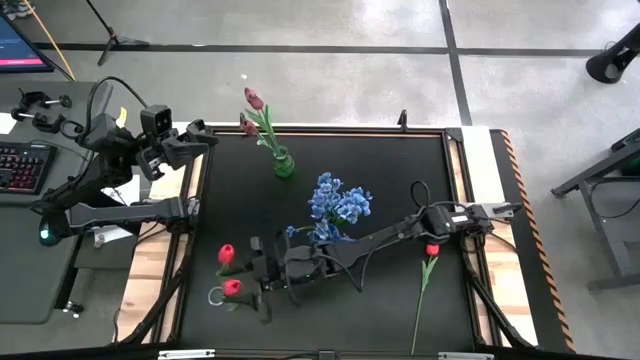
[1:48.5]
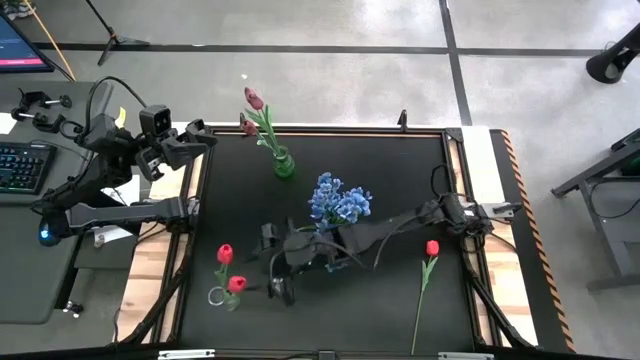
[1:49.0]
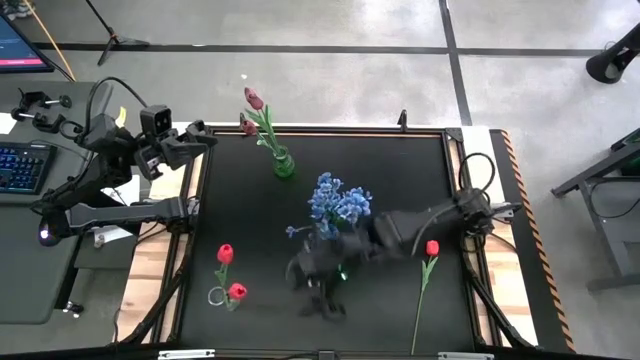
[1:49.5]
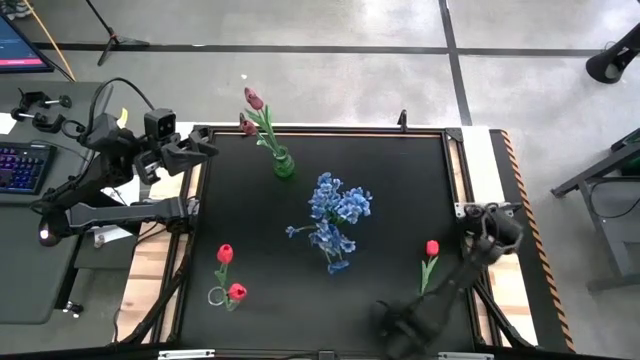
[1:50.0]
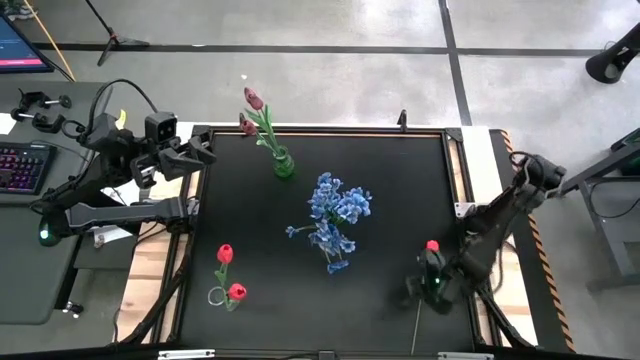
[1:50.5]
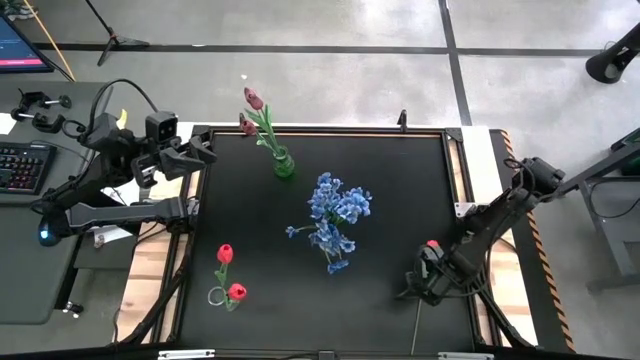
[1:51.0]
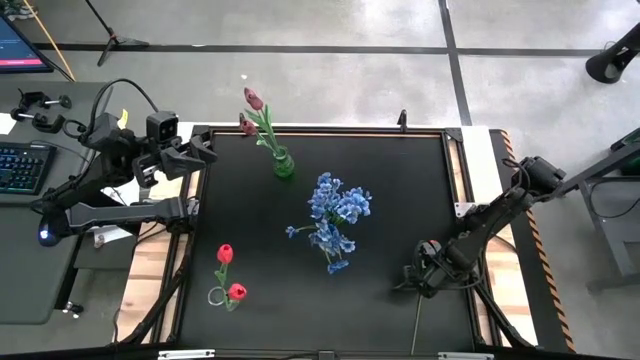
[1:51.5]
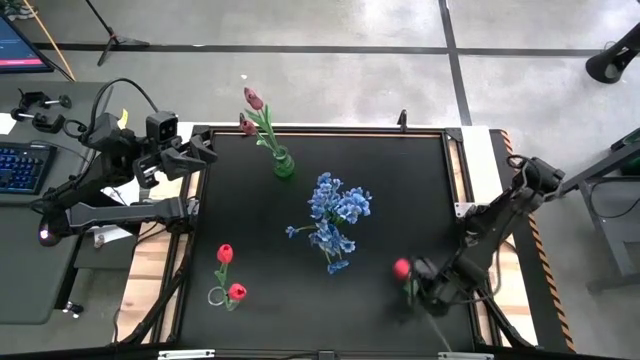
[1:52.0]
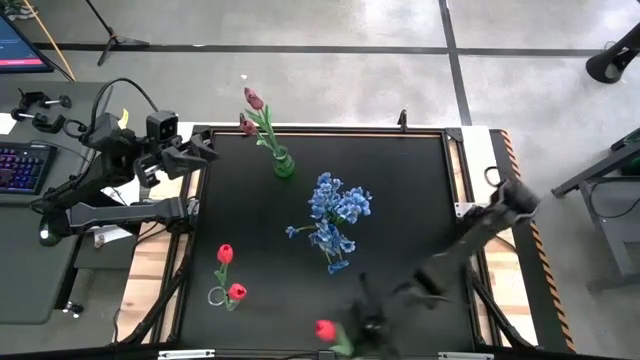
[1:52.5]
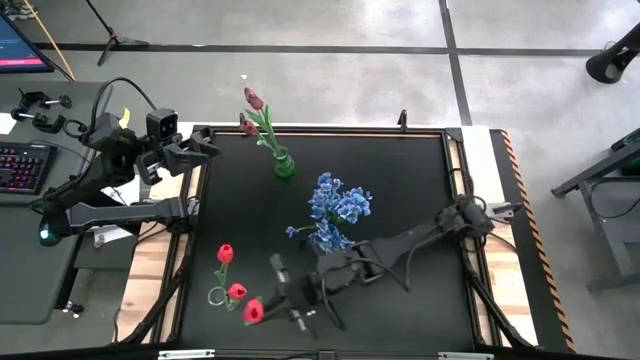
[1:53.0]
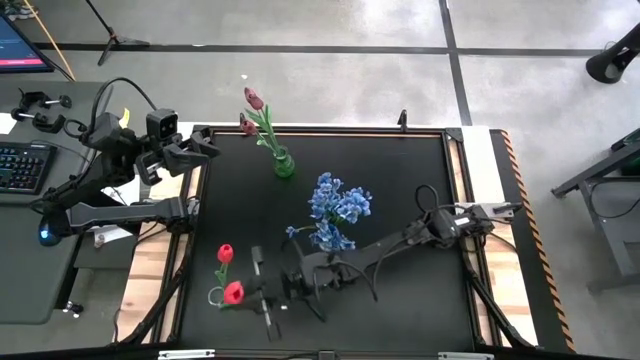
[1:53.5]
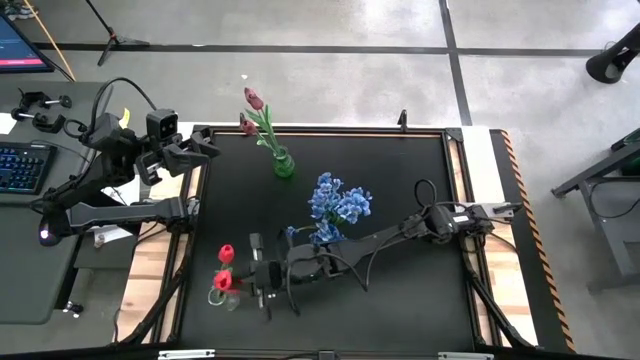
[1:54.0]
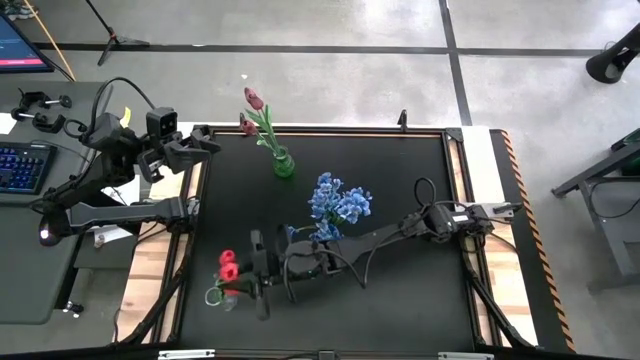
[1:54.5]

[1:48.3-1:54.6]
Task: Sort flowers into vase by color
Put the red tulip into the left transparent vase

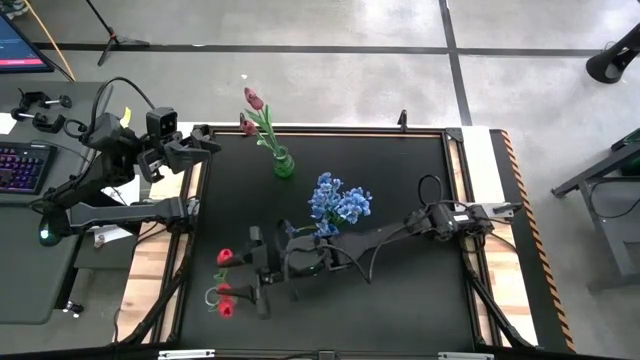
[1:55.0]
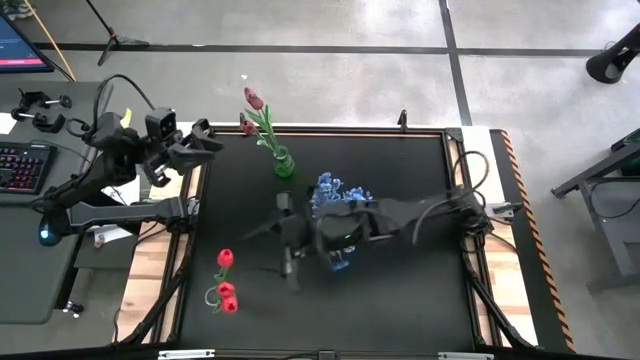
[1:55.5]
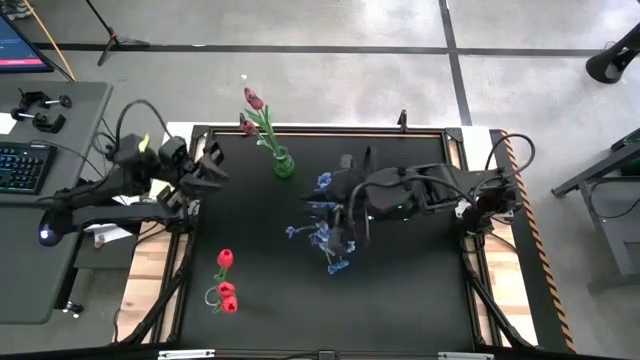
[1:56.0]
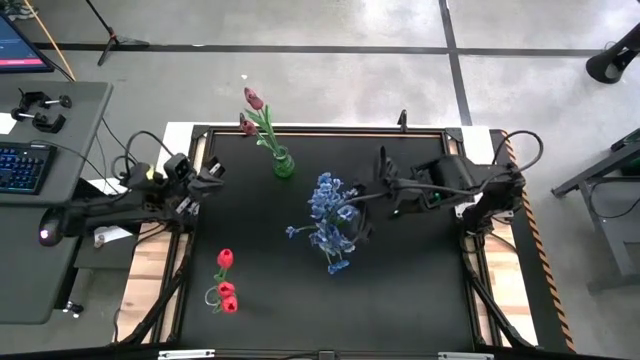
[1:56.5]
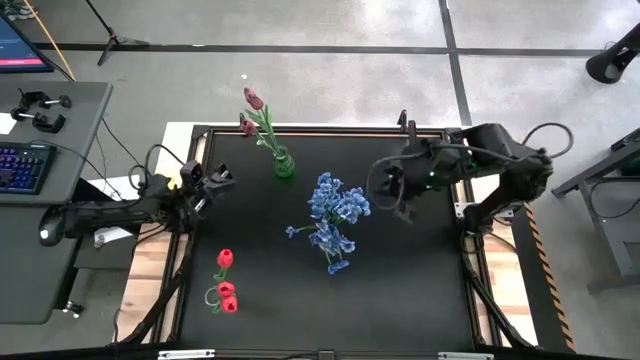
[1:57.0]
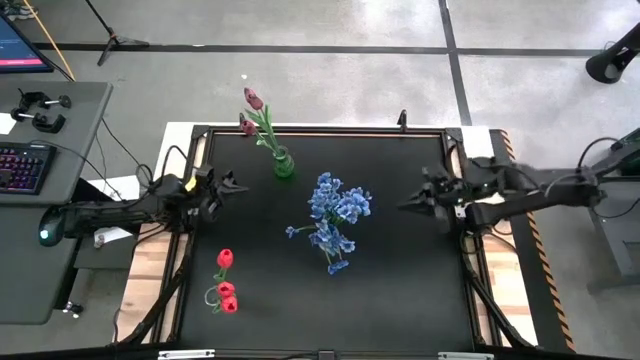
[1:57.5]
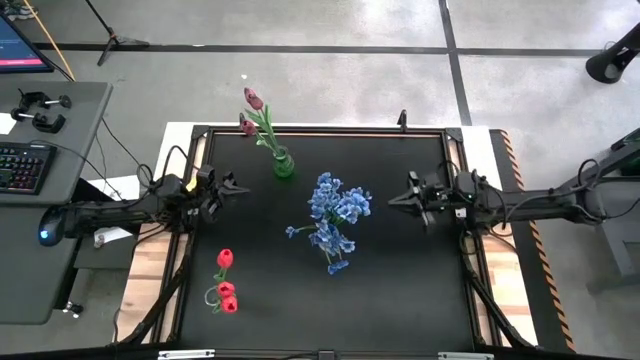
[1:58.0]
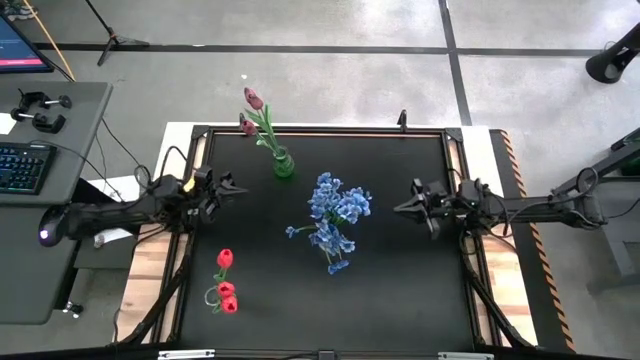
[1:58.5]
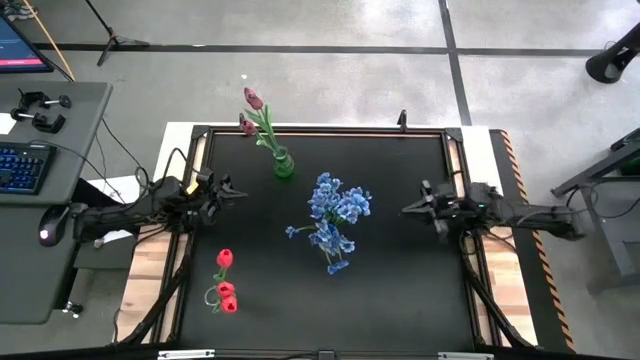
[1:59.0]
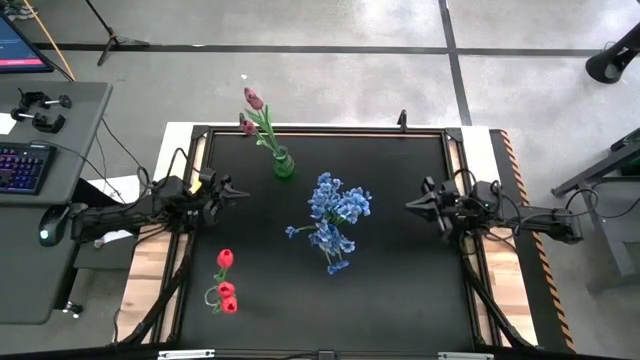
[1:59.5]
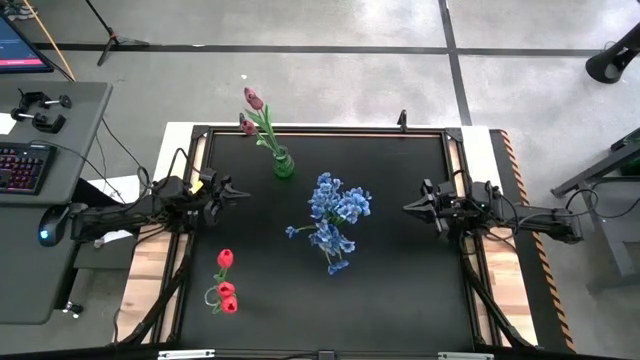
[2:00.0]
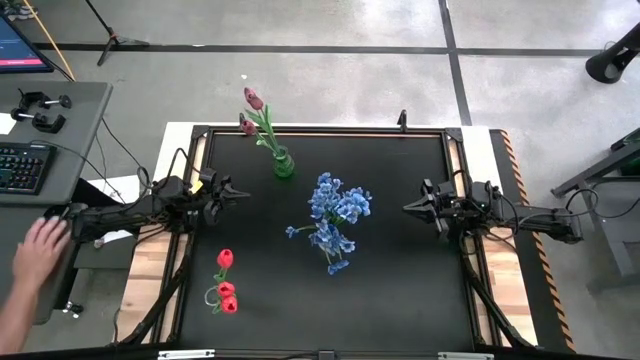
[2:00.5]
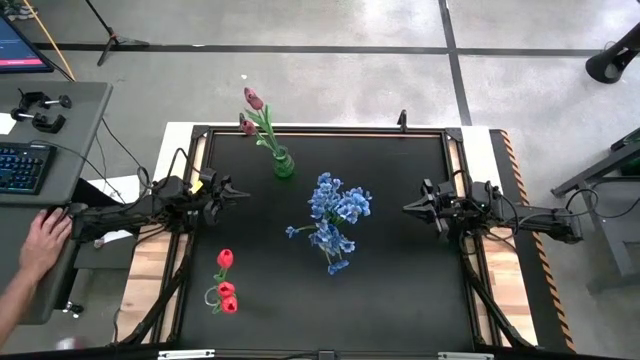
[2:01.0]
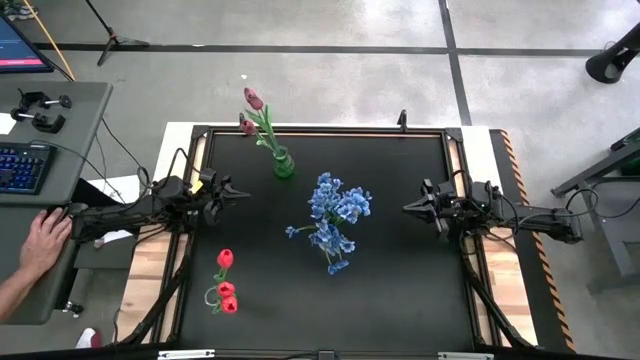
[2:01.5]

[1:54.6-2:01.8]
Return to Home Position

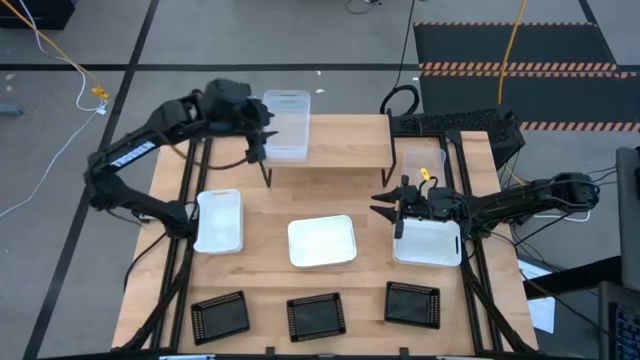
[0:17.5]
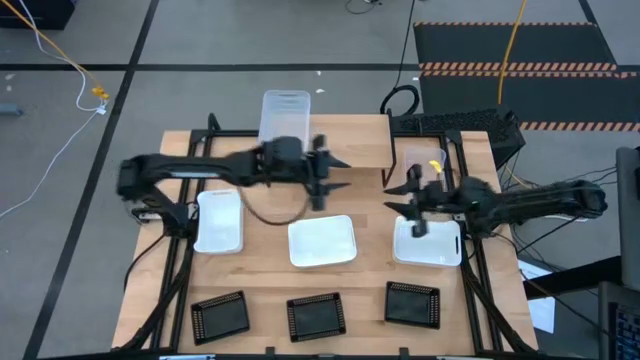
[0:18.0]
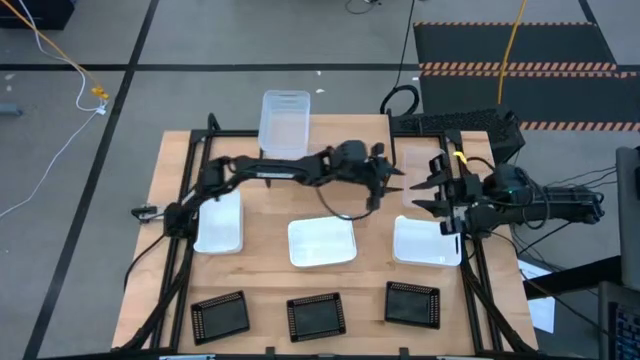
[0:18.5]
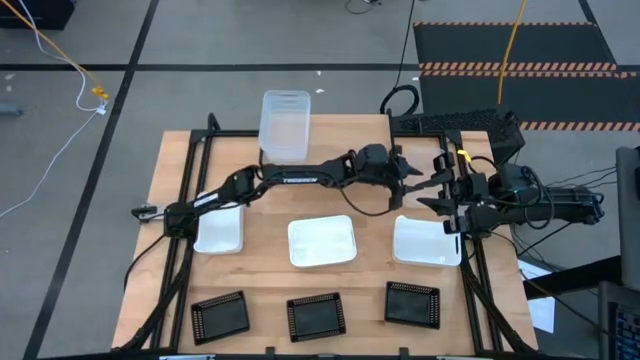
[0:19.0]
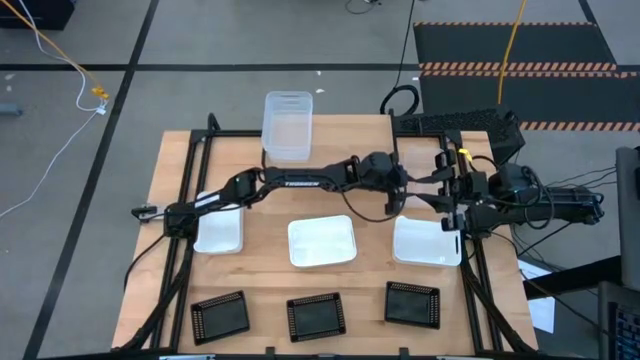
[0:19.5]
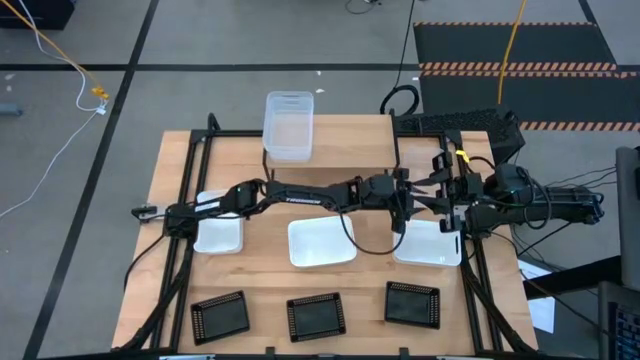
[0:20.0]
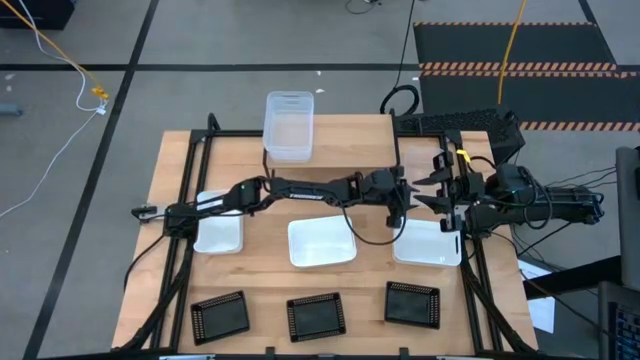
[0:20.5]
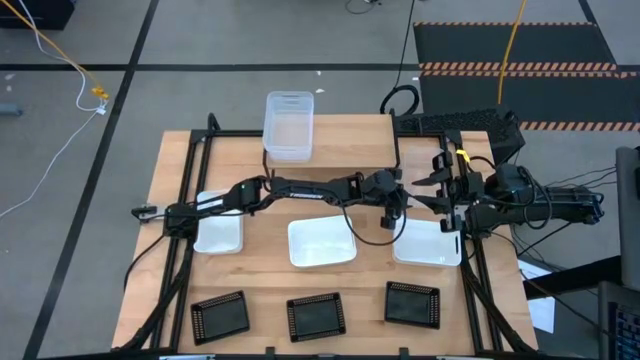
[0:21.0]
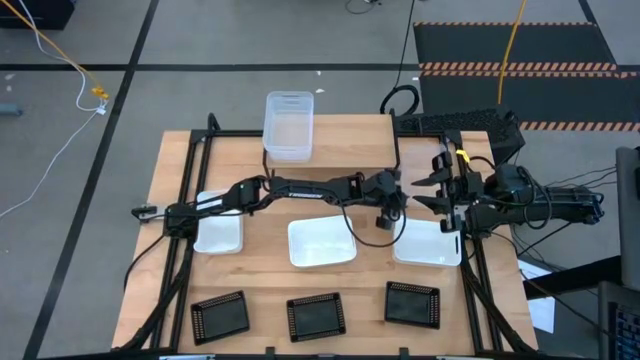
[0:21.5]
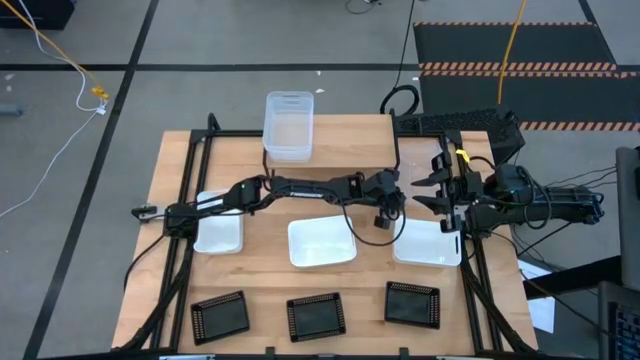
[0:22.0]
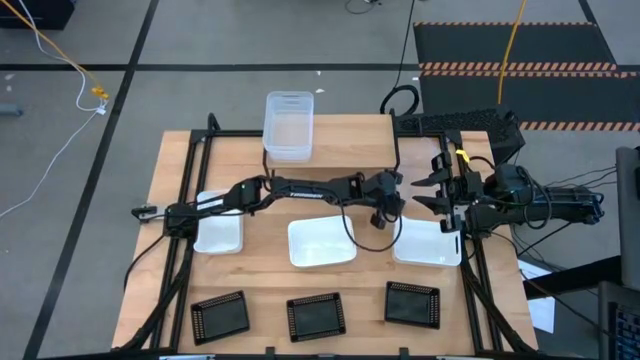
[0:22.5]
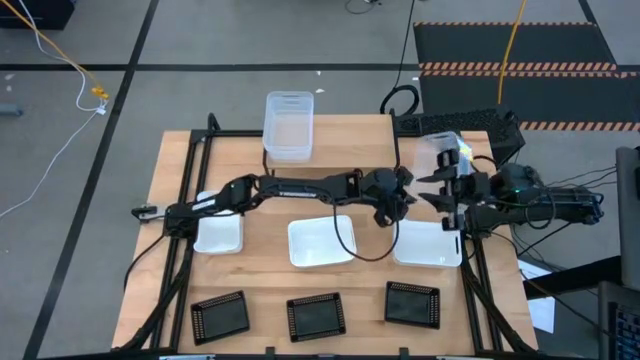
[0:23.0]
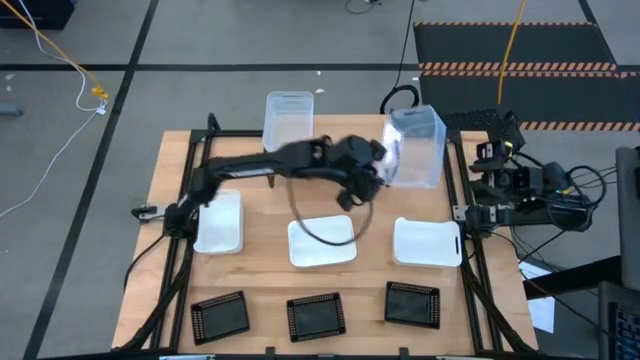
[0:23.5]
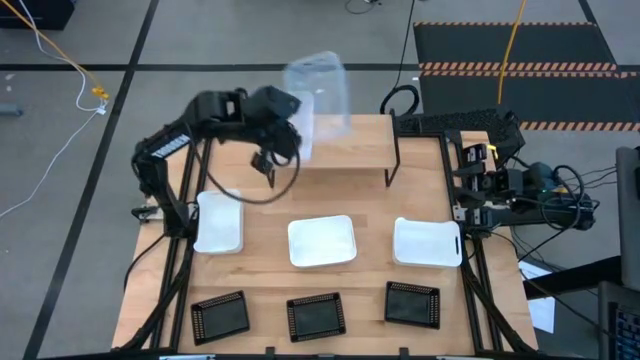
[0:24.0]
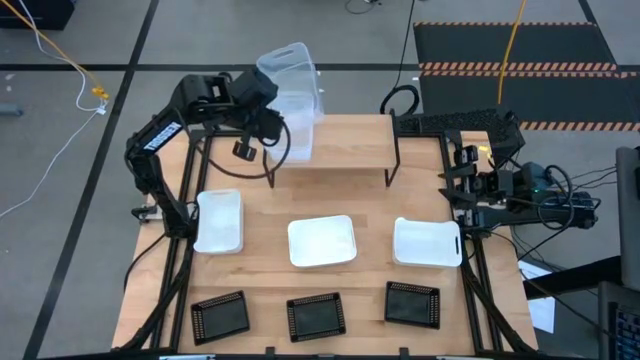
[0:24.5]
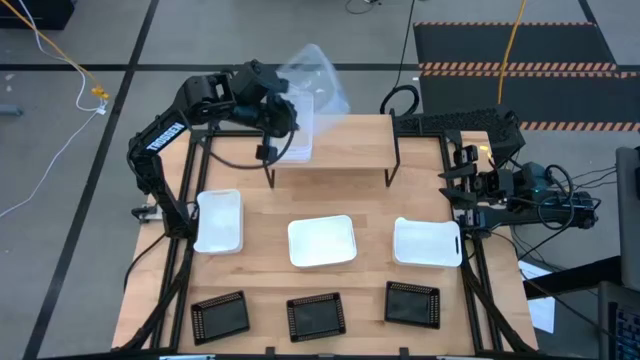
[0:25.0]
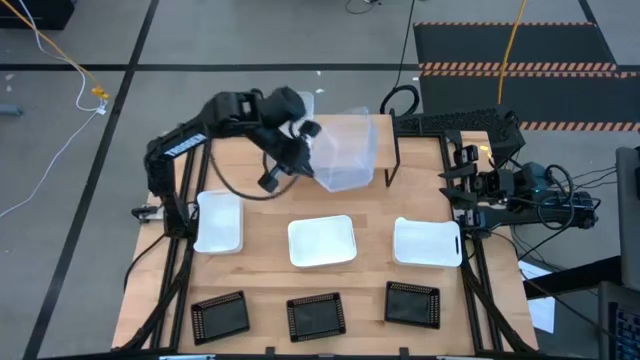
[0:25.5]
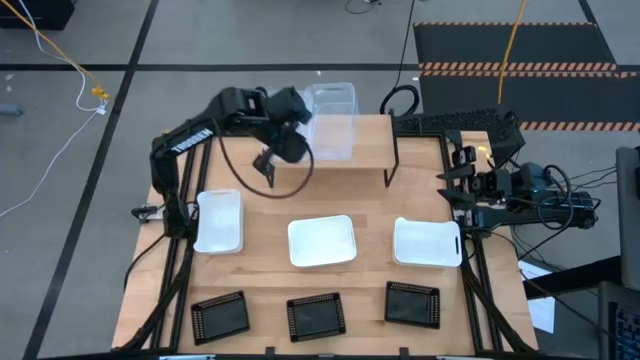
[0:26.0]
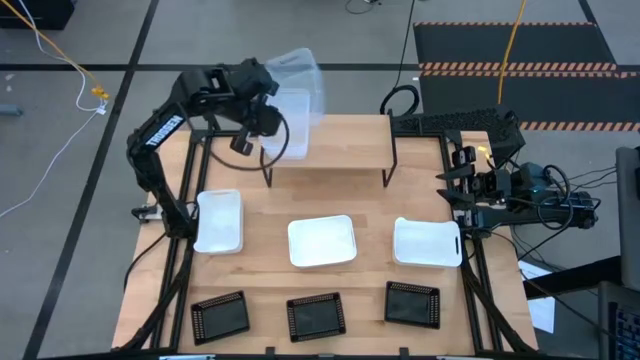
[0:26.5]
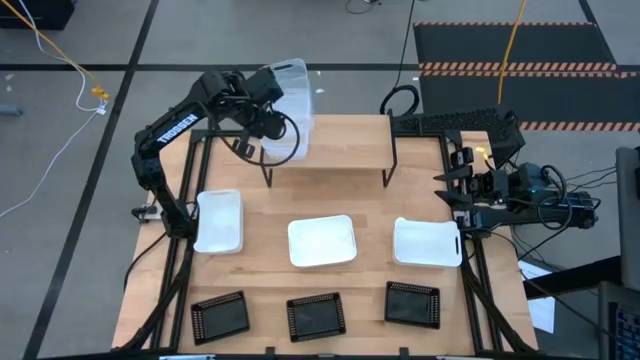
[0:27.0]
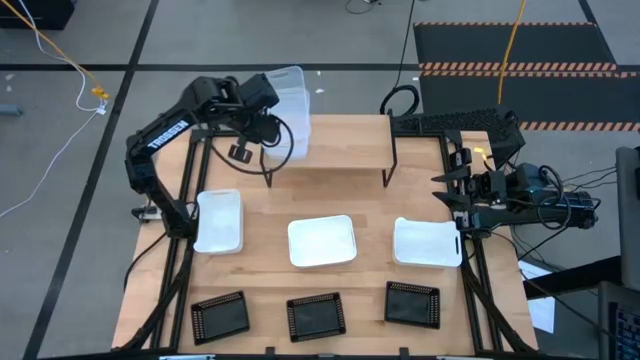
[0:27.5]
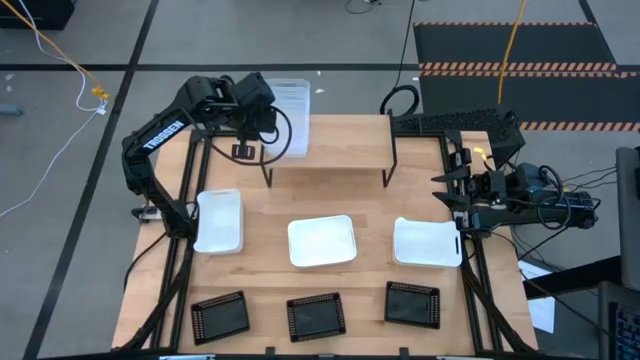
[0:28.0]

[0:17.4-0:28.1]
Task: Stack baskets on shelf by color
Stack the transparent bin on the transparent bins on the shelf
